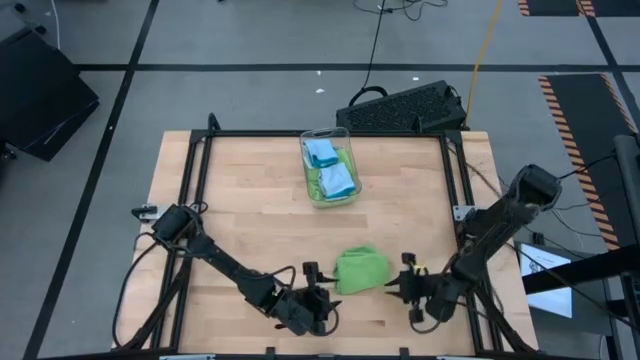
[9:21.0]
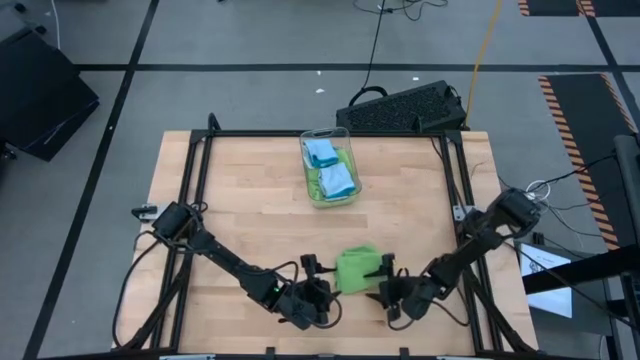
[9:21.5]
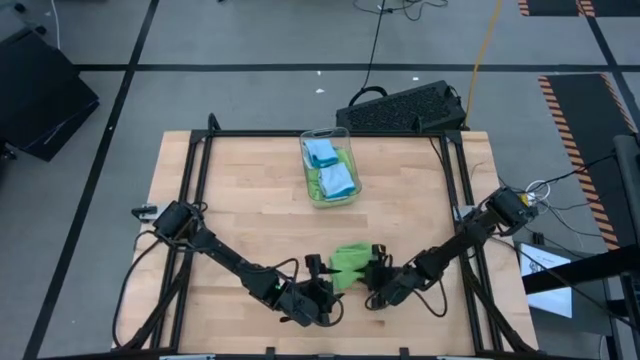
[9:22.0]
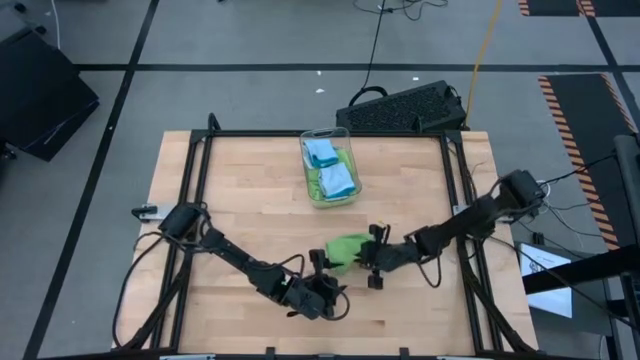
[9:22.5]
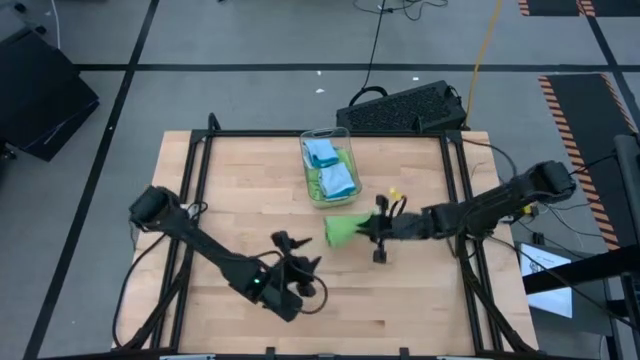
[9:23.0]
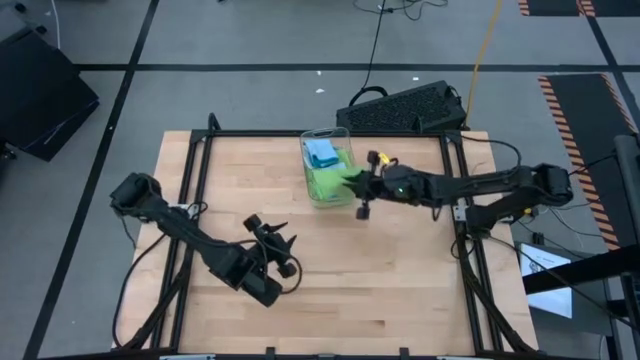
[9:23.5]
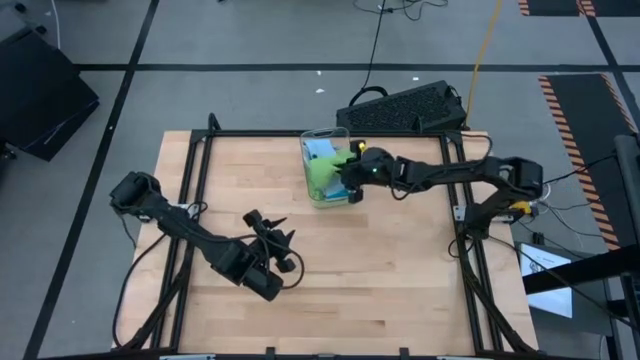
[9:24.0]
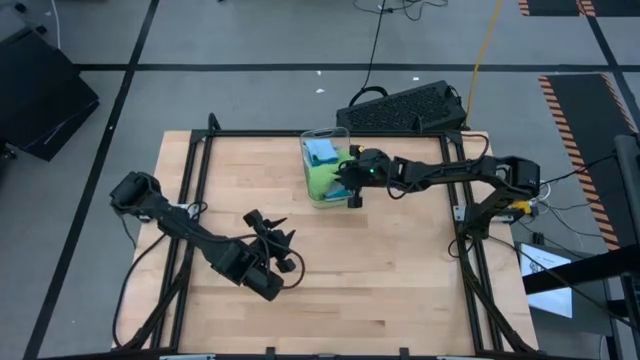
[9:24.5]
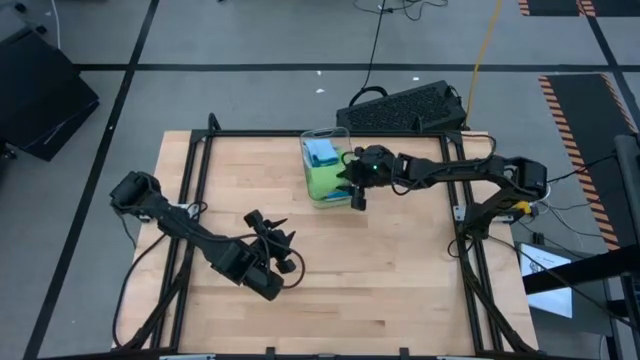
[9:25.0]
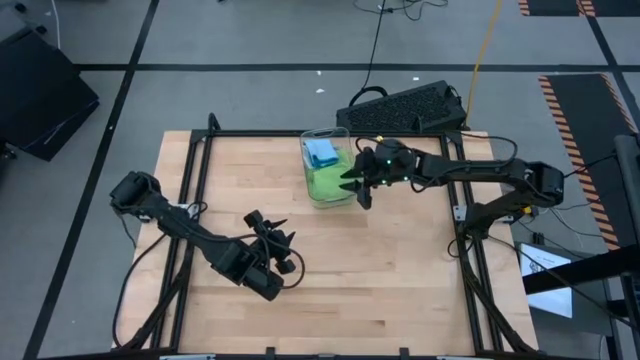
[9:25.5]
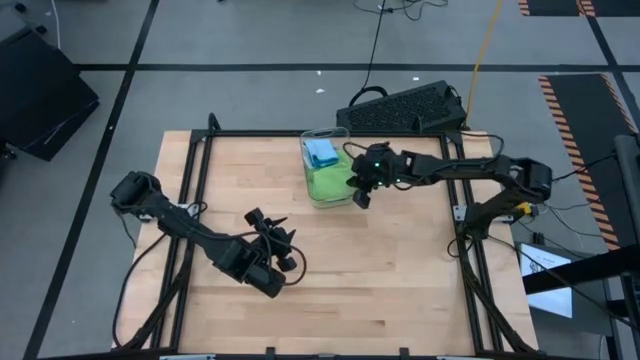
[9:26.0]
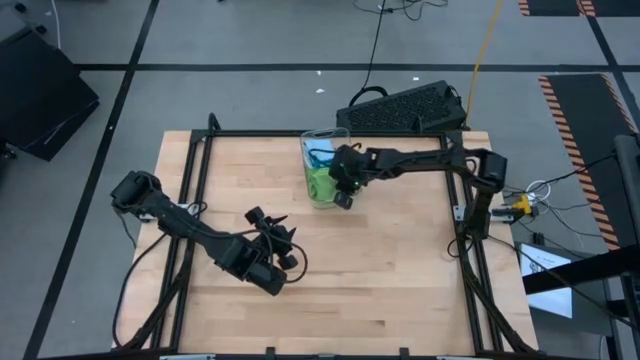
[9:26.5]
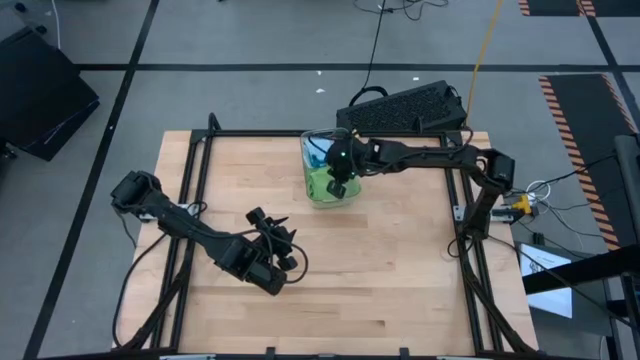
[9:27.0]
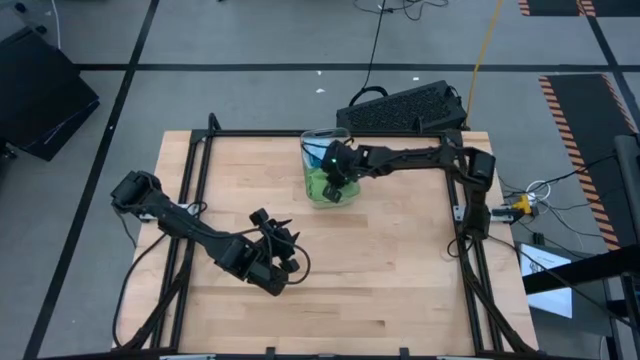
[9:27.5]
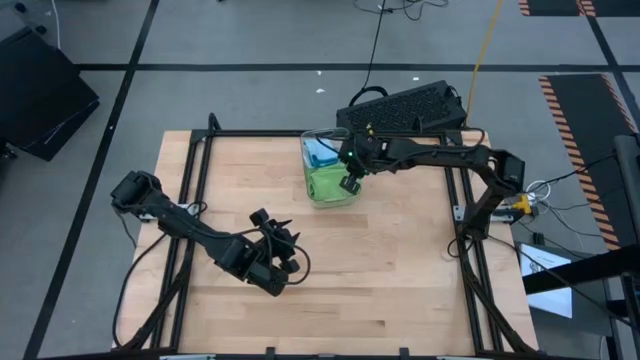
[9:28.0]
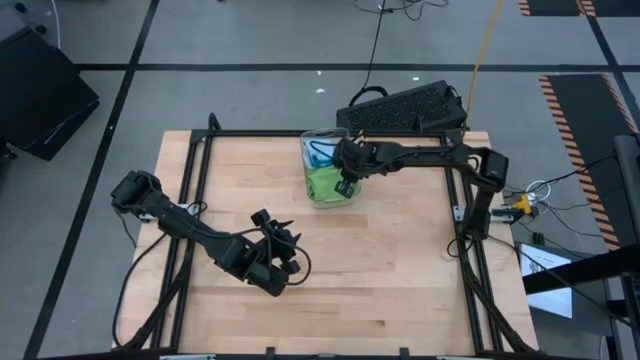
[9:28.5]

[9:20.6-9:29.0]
Task: Fold microfiber towels
Put the green towel into the transparent bin

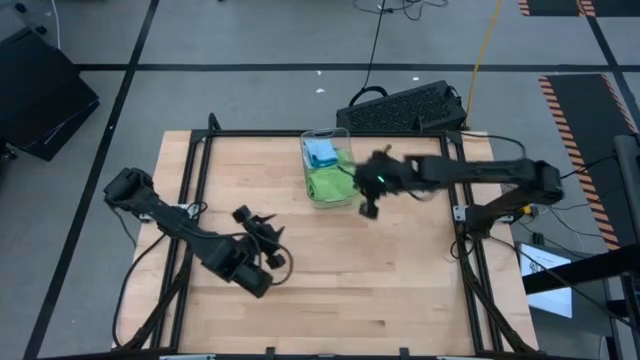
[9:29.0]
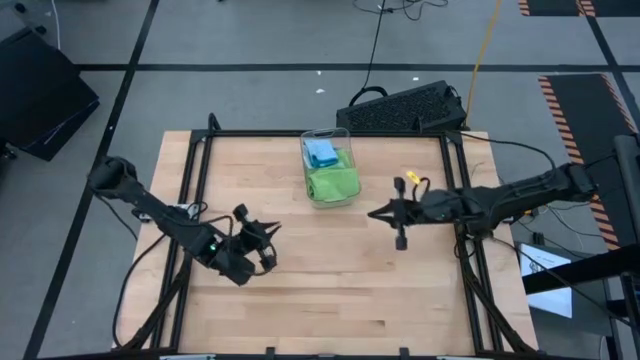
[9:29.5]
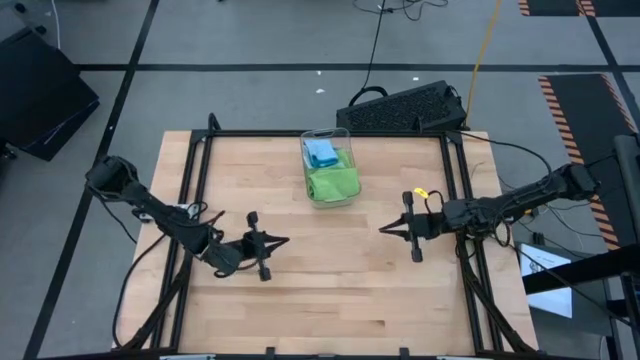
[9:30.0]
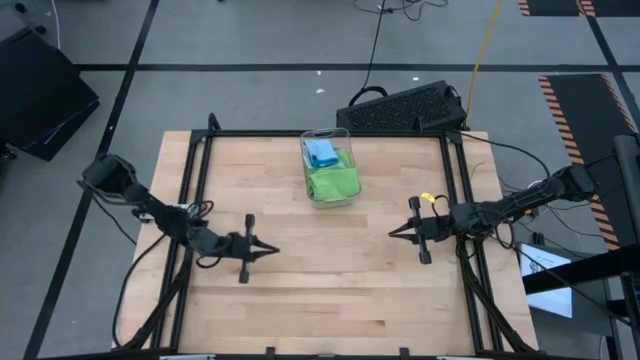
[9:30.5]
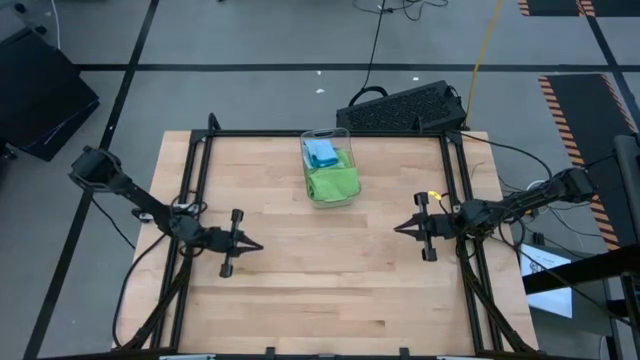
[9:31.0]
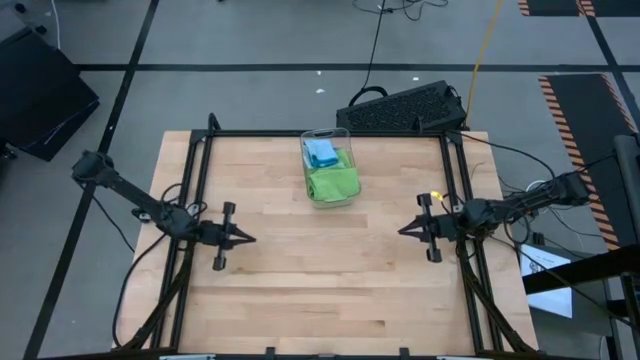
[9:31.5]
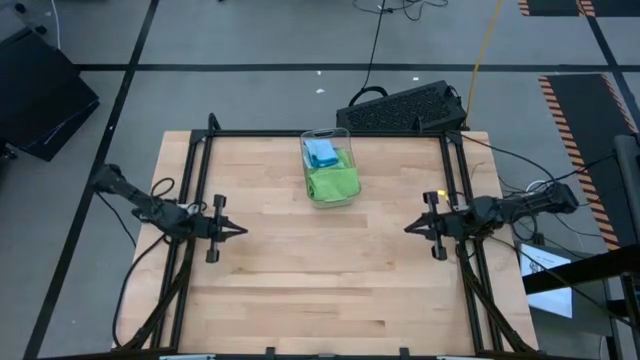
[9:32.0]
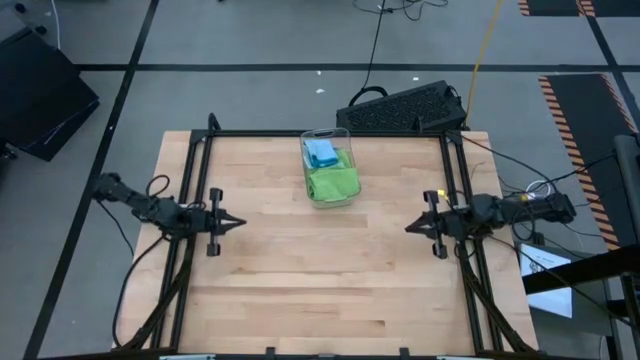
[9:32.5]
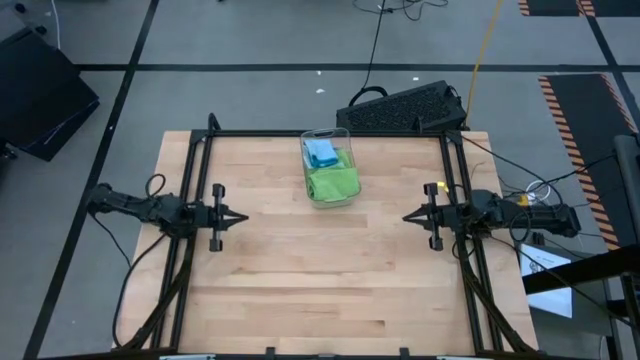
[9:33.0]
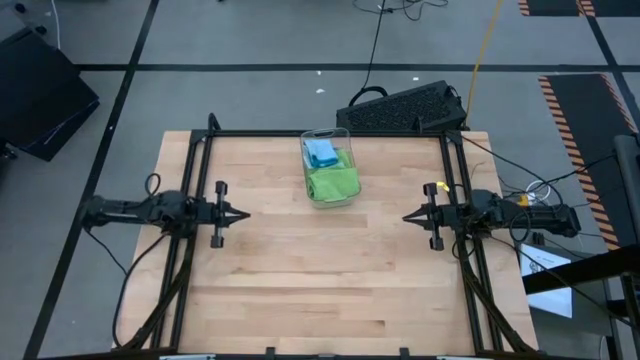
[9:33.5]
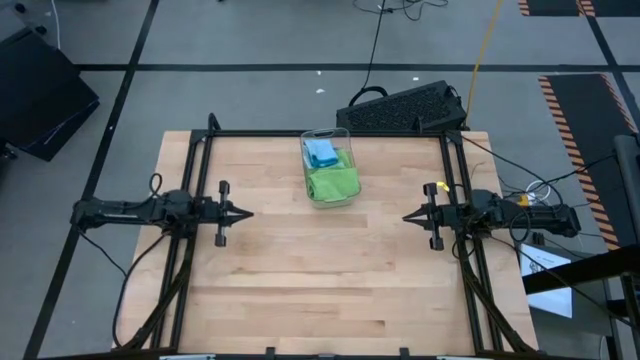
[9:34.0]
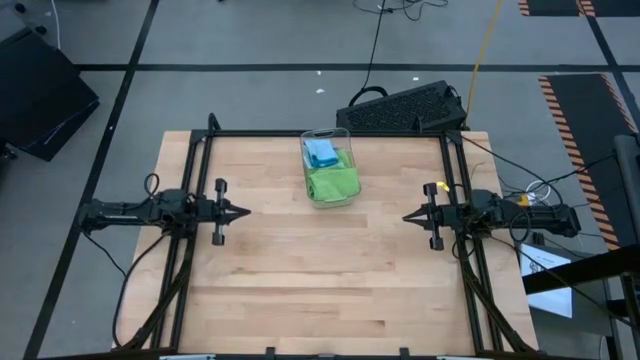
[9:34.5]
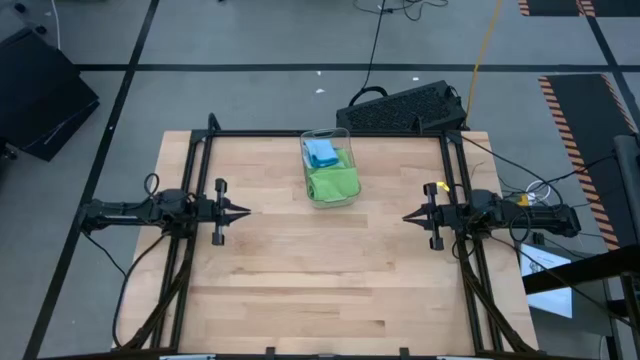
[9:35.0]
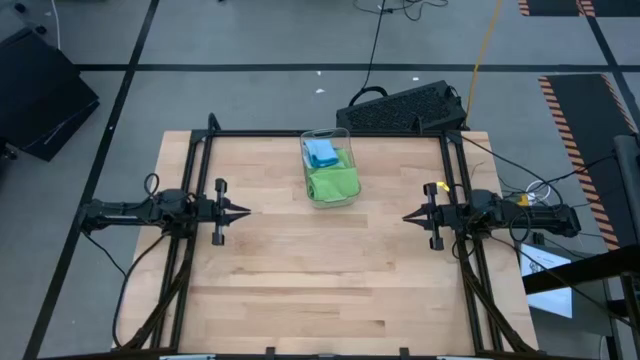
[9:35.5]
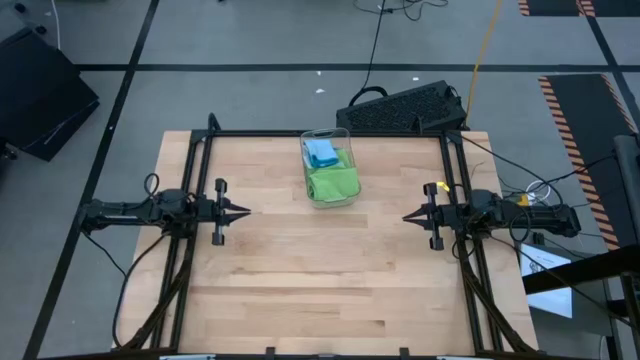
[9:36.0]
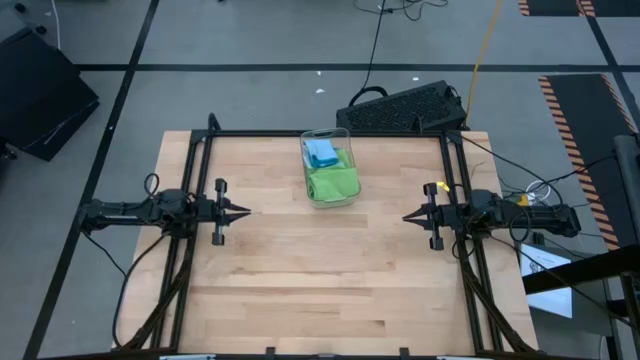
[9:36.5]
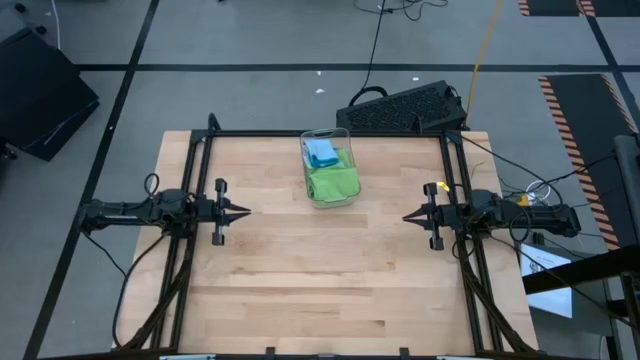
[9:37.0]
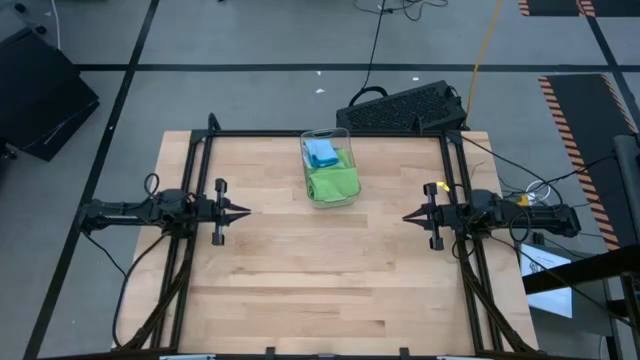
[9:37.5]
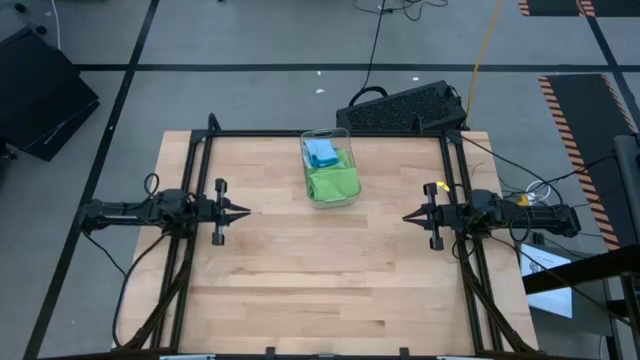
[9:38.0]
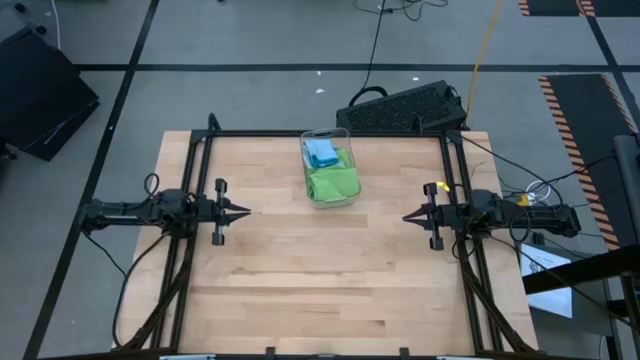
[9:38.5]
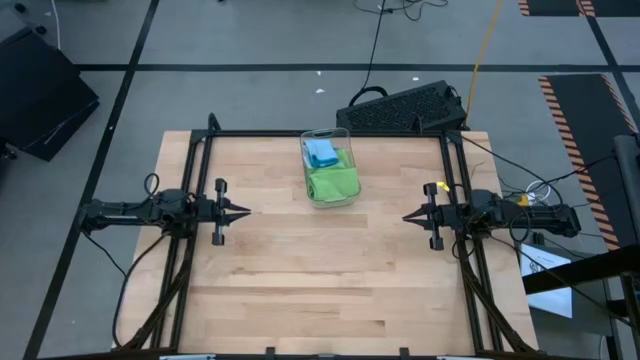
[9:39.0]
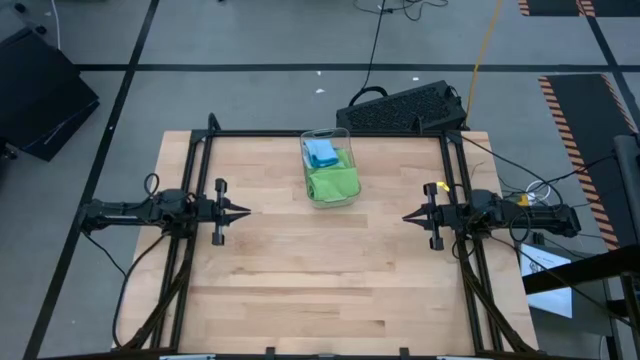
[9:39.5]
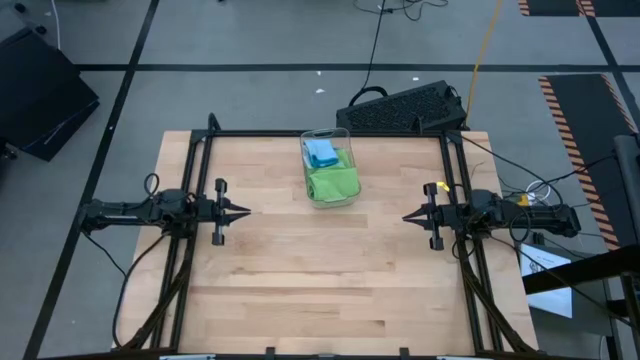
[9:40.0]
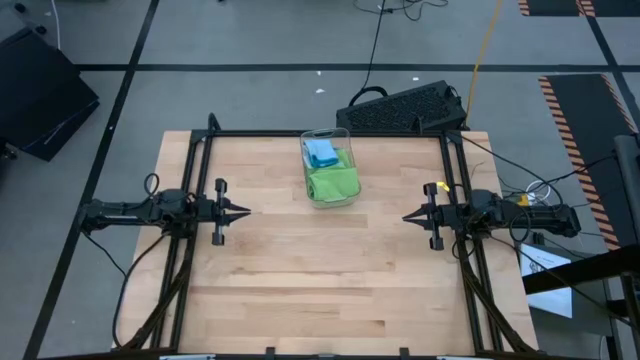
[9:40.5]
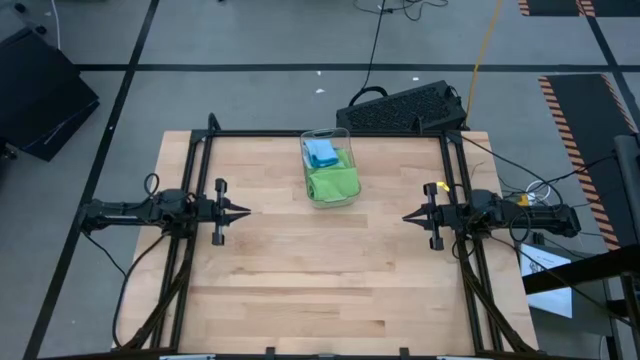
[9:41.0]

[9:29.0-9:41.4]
Return to Home Position
